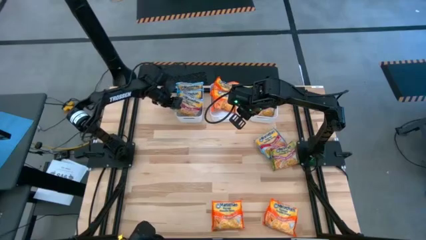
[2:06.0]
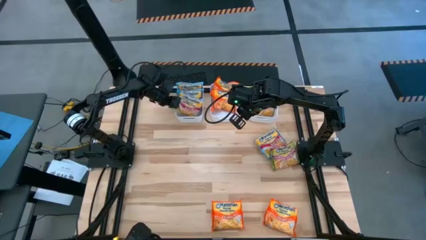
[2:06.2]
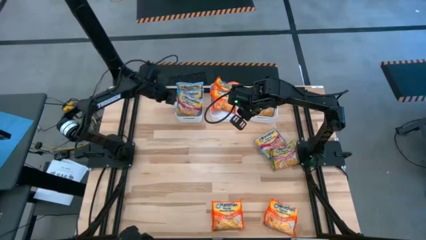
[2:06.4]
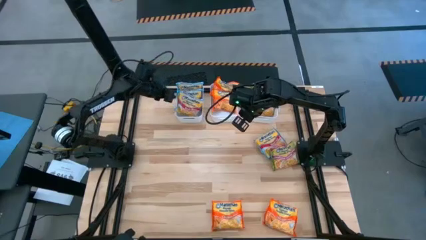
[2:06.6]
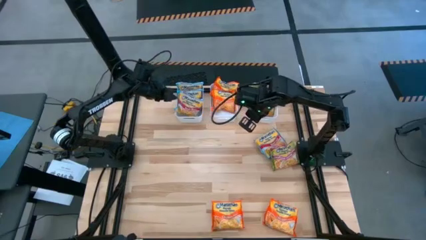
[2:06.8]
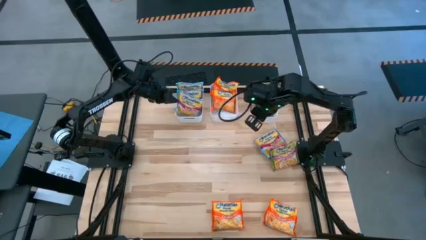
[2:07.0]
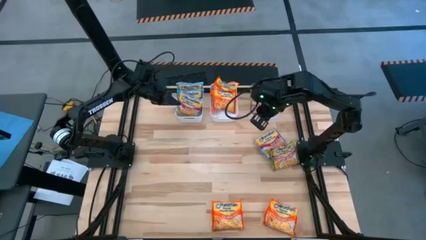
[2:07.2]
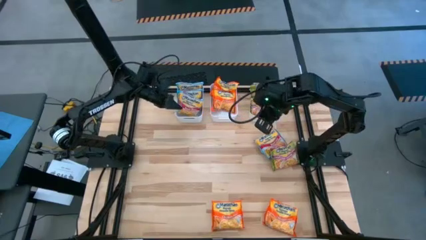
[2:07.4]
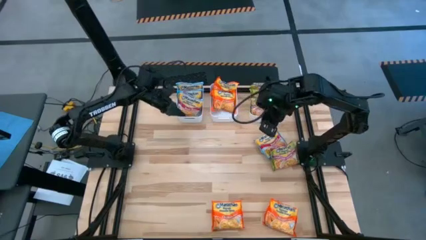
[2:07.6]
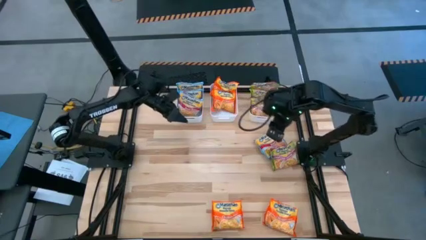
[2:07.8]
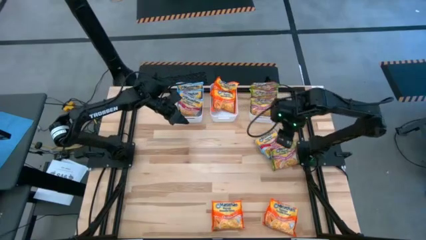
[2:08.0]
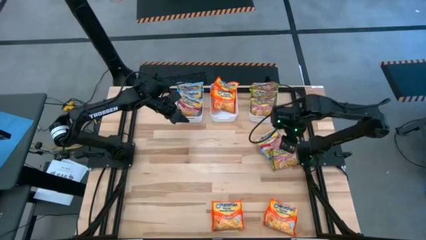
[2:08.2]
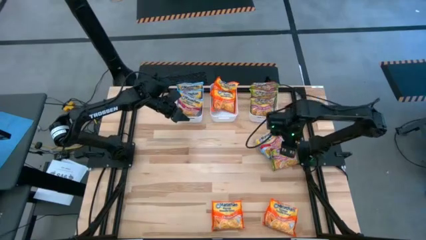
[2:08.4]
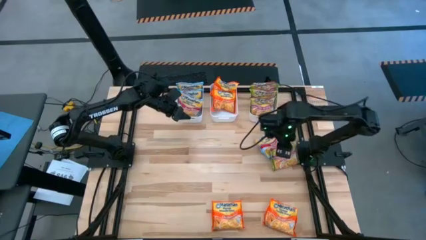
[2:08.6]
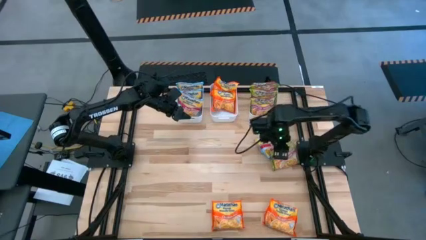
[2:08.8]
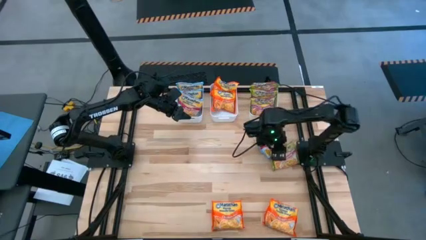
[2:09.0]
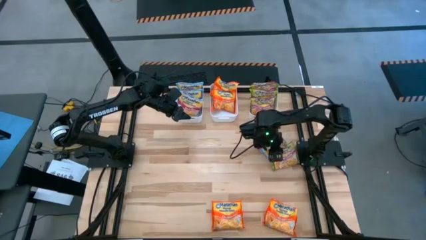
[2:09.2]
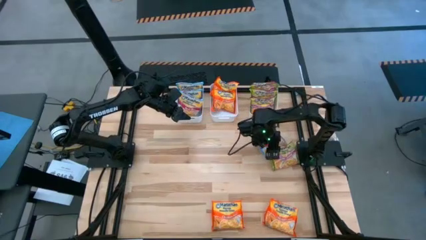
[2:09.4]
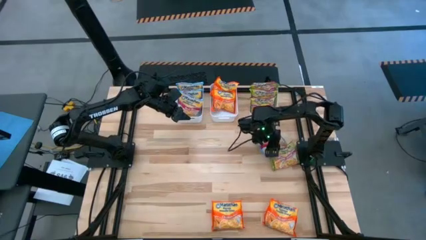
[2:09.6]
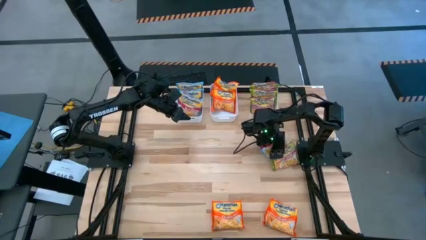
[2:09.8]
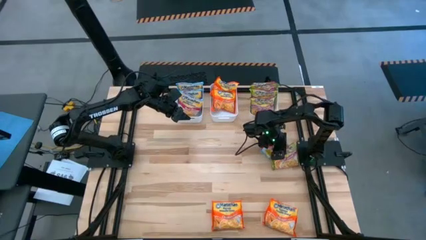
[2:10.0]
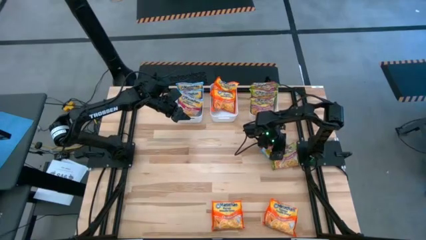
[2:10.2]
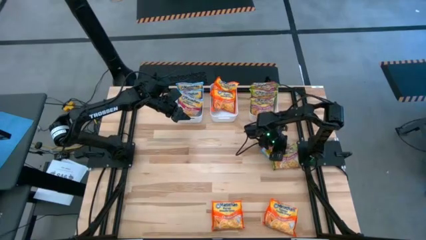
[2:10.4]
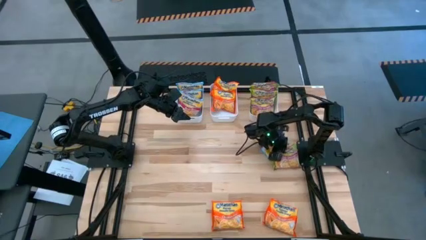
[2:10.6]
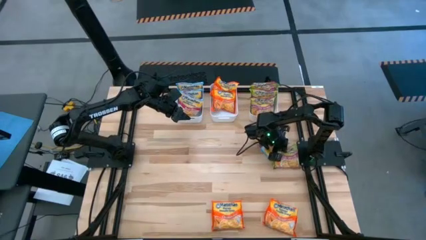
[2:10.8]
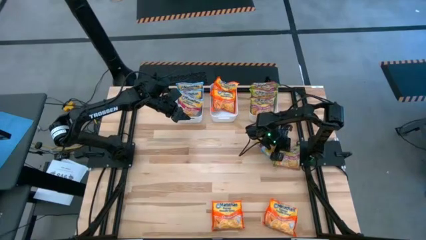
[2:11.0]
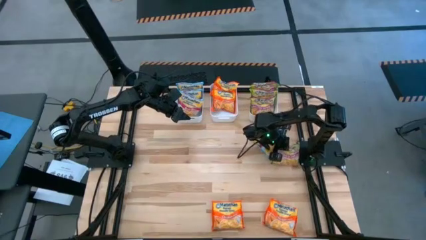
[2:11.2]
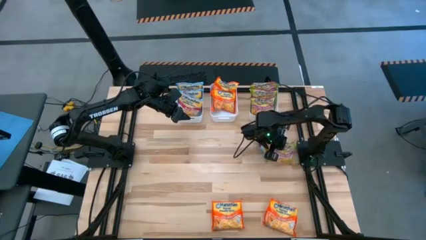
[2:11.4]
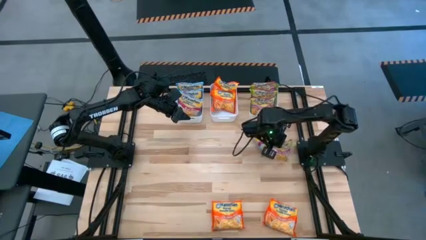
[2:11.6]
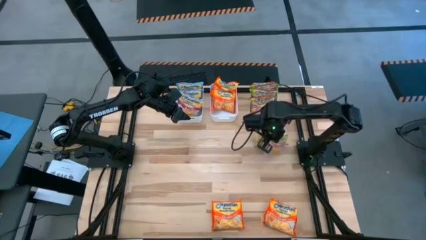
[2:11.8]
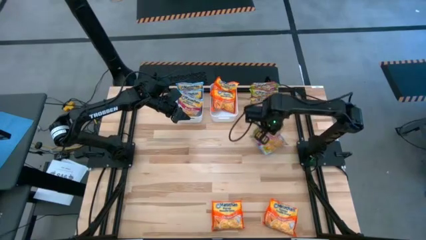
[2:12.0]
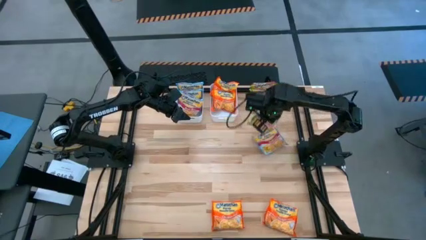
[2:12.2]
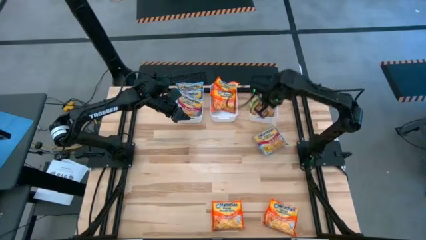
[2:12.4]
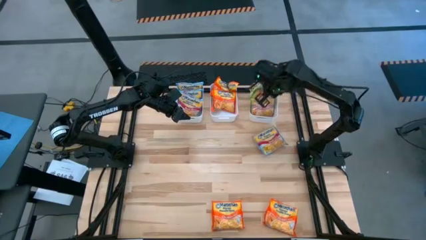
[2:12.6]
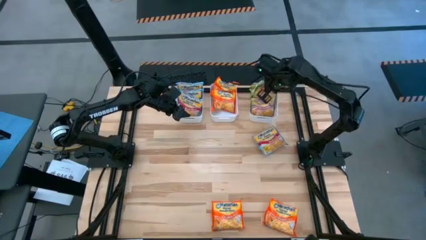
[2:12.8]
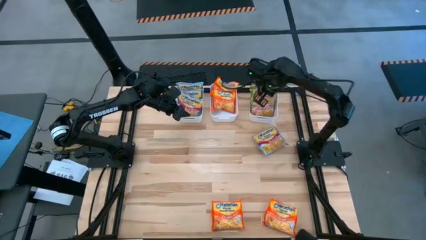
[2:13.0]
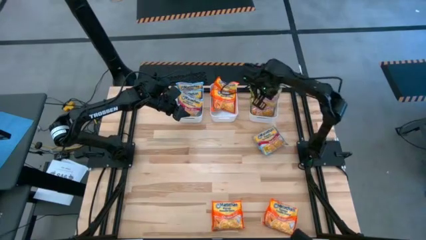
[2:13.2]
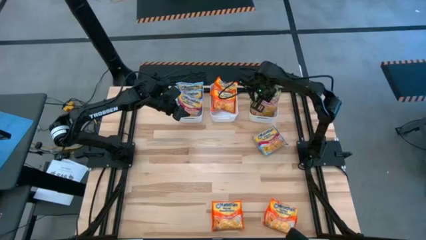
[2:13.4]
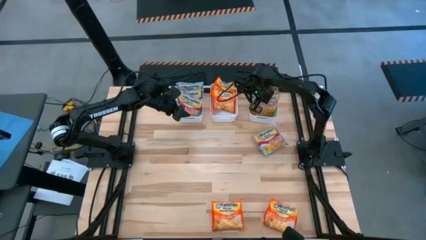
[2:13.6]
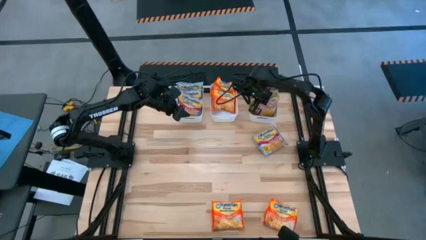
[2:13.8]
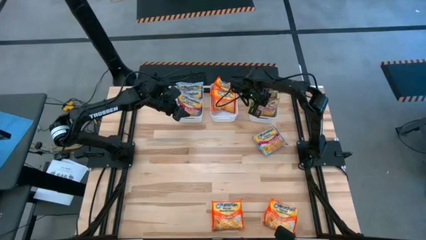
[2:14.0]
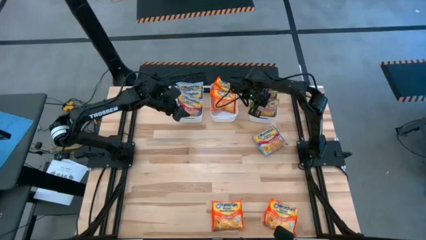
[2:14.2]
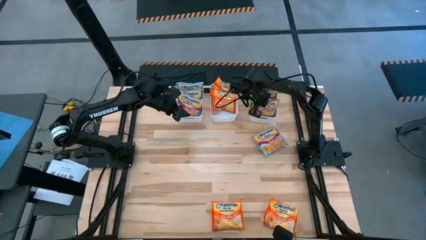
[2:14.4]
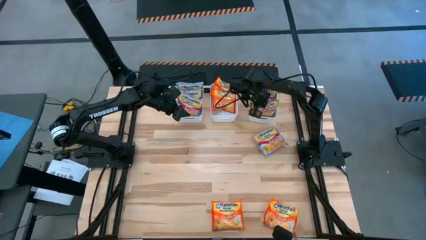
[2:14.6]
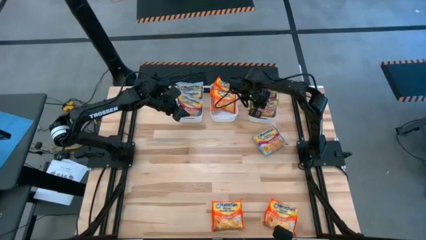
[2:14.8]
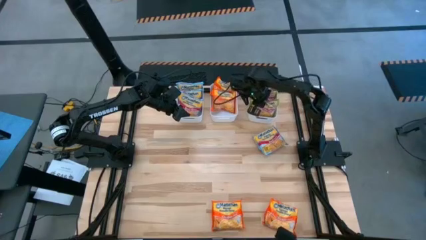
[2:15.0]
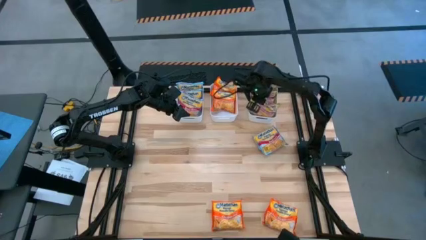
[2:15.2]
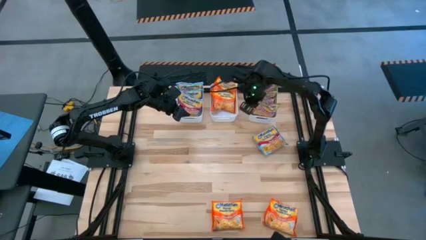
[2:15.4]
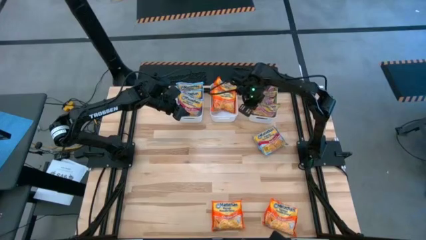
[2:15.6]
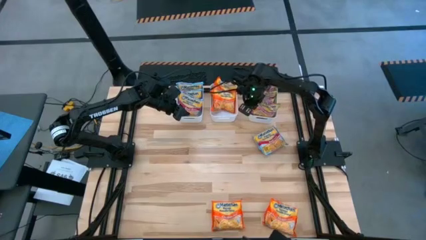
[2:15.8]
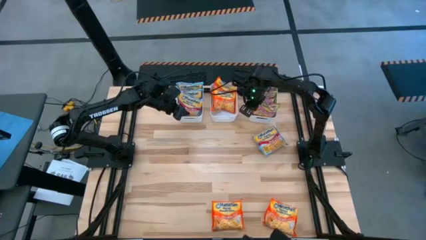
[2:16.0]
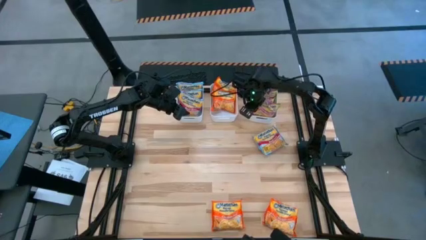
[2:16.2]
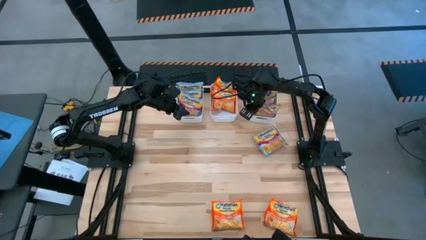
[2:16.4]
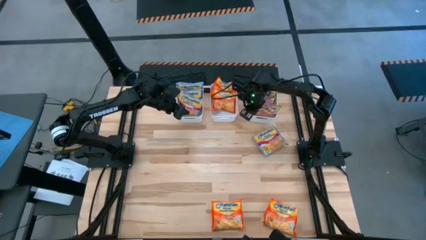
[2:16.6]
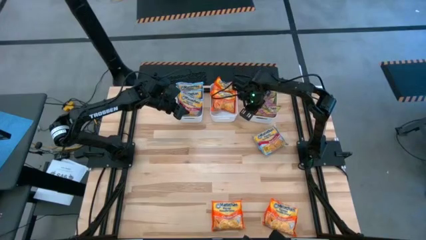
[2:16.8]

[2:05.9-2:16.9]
Task: Sort Maruchan noodles
Put the green noodle pack into the right white bin

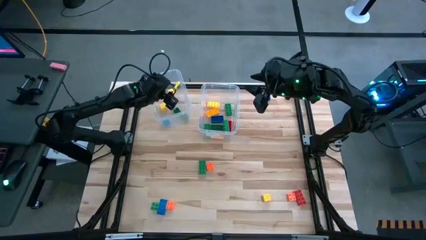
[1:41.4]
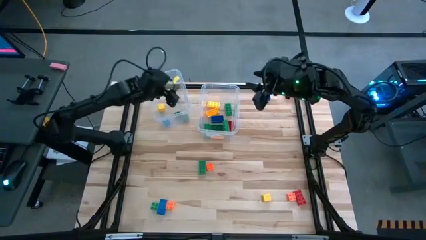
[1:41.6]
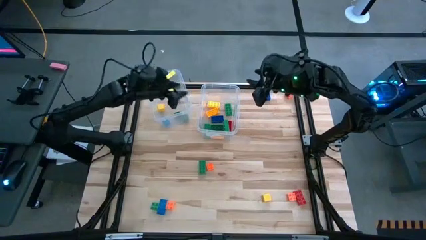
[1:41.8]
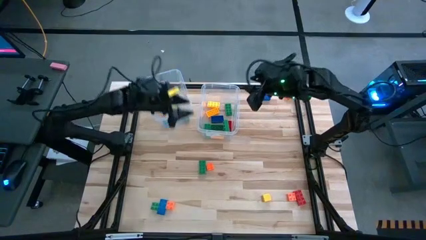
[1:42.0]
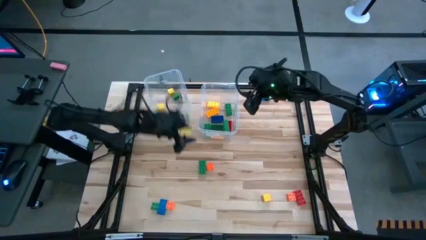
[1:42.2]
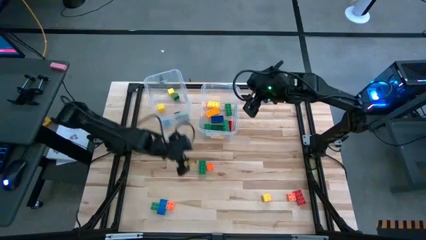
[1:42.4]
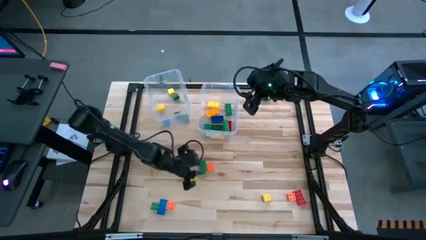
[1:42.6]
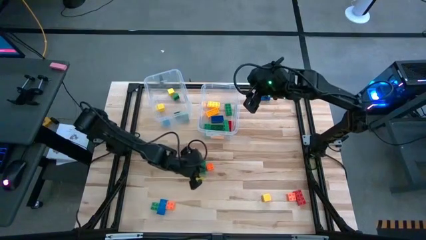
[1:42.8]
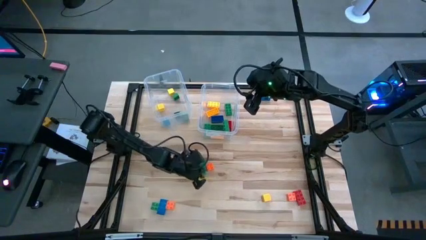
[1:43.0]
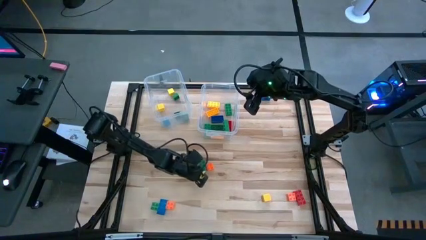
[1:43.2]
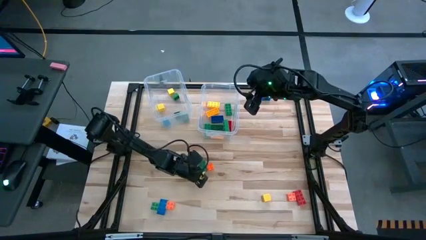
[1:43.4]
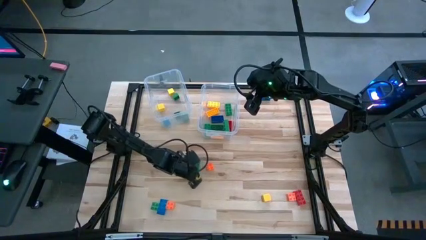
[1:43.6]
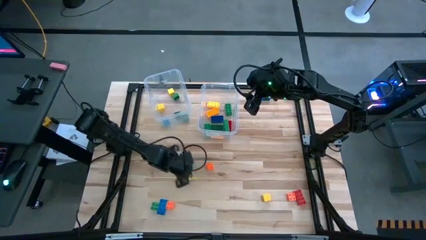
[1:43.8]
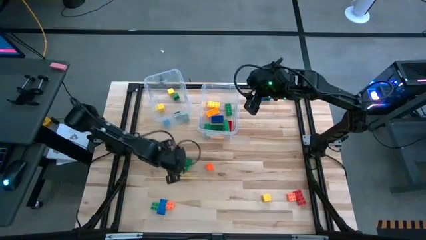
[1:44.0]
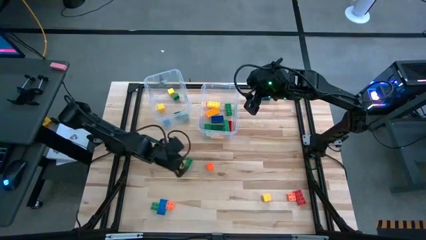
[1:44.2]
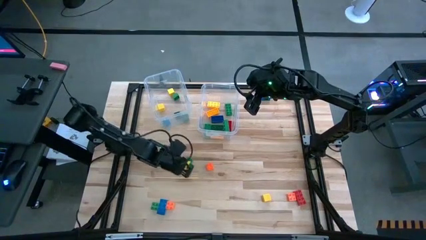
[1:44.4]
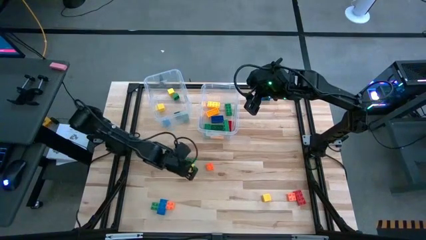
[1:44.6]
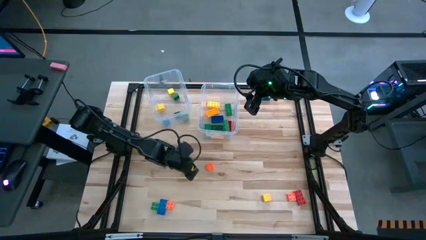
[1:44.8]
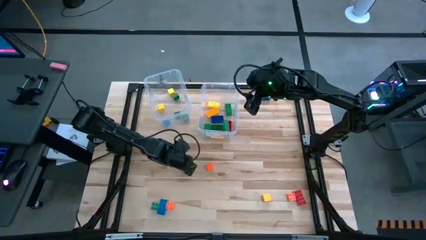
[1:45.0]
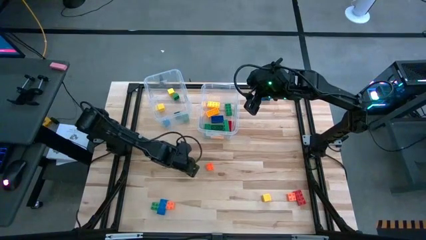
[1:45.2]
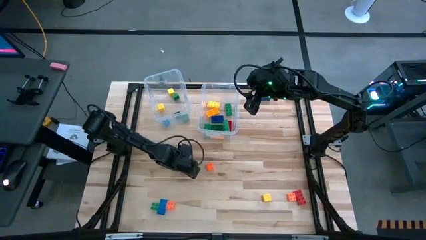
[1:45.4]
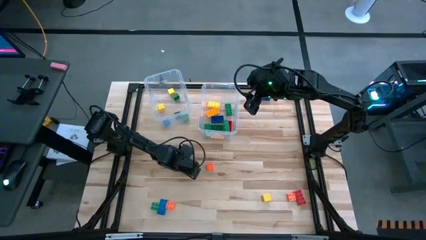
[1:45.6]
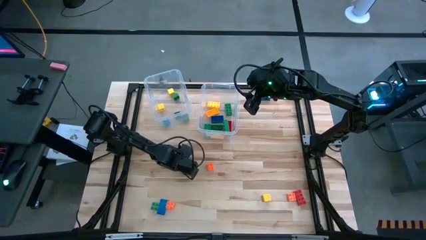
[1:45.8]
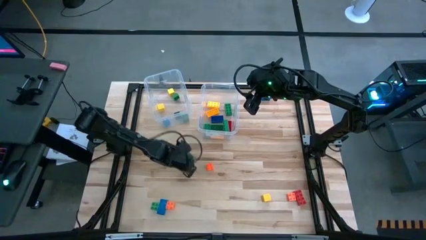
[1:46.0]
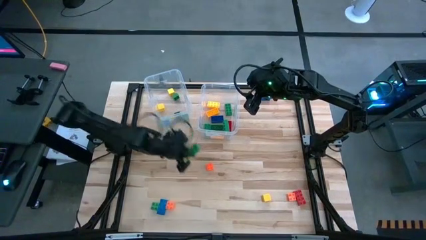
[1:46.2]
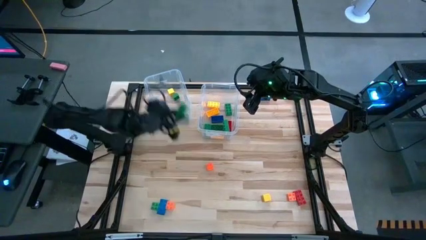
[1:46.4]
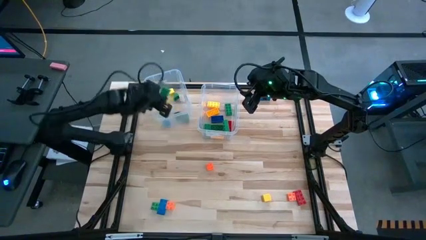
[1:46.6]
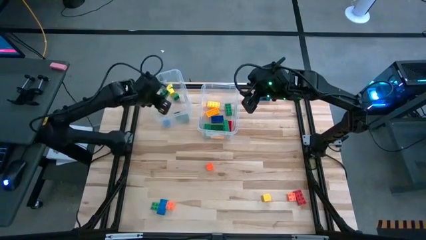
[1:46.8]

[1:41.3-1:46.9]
Task: Sort blocks by size
Put the green big game piece into the right transparent bin
